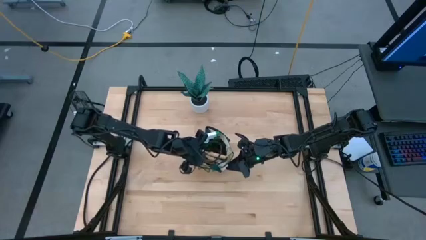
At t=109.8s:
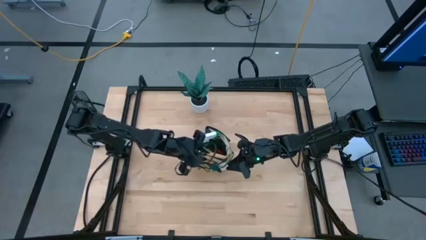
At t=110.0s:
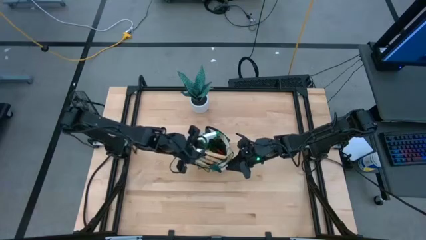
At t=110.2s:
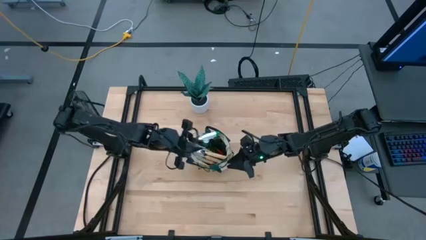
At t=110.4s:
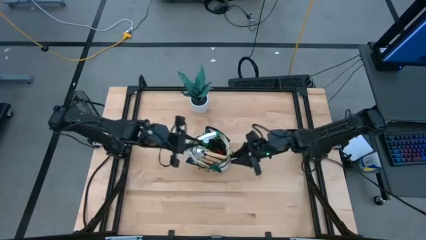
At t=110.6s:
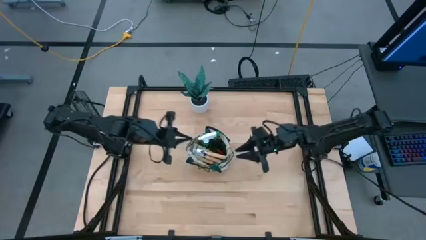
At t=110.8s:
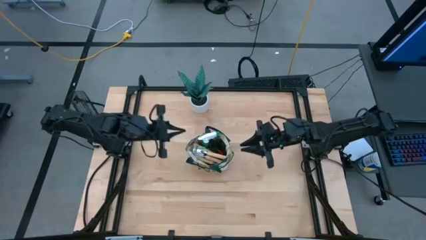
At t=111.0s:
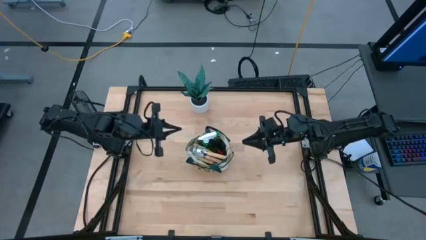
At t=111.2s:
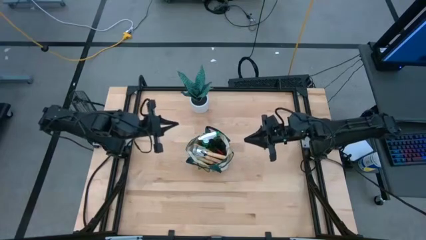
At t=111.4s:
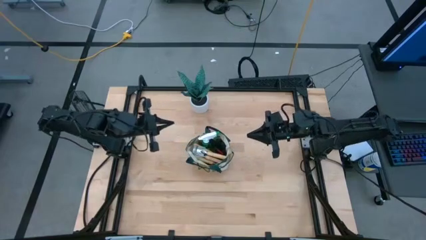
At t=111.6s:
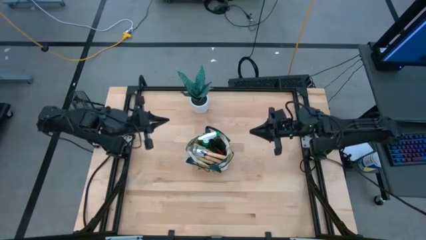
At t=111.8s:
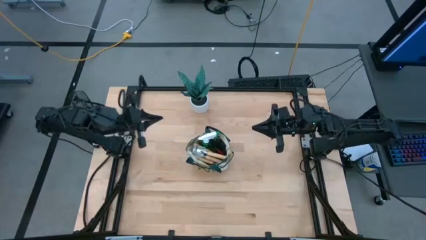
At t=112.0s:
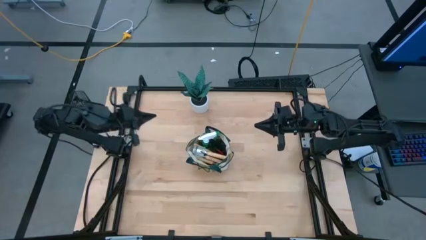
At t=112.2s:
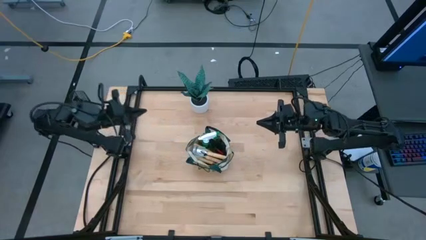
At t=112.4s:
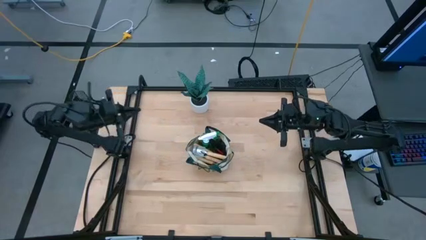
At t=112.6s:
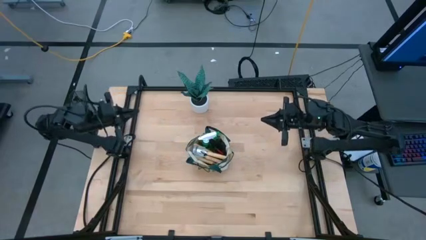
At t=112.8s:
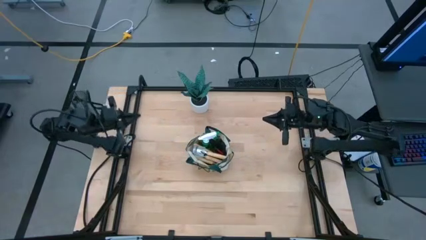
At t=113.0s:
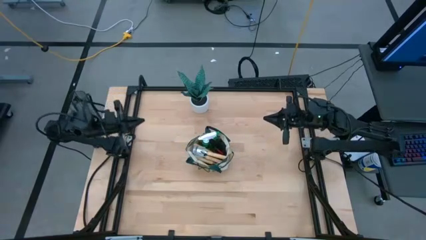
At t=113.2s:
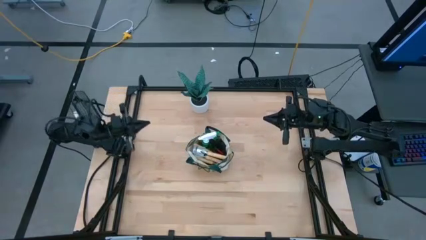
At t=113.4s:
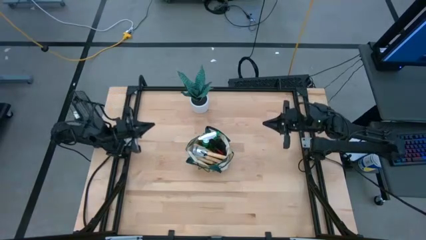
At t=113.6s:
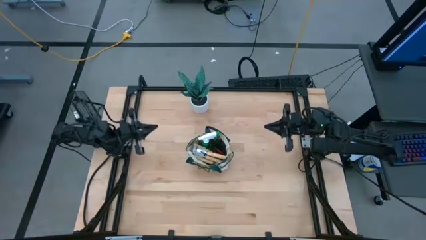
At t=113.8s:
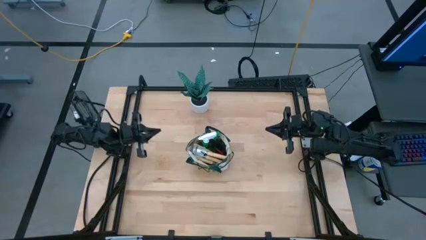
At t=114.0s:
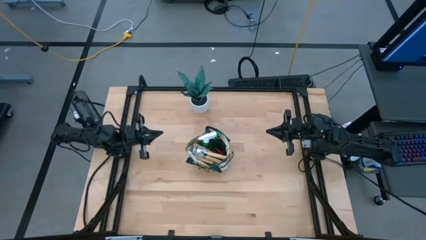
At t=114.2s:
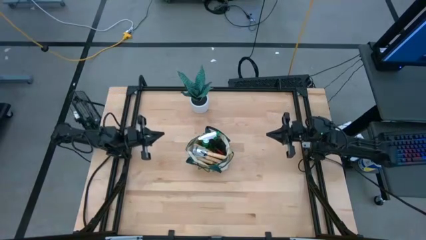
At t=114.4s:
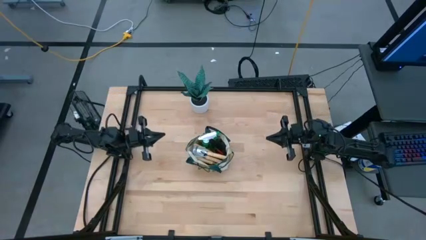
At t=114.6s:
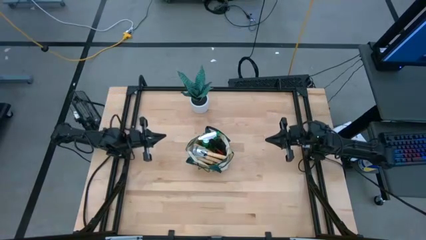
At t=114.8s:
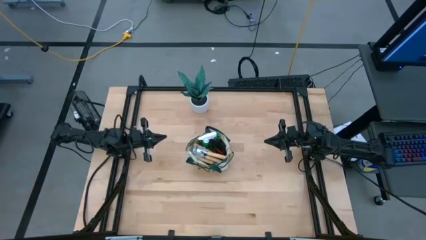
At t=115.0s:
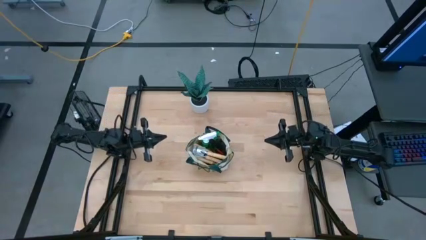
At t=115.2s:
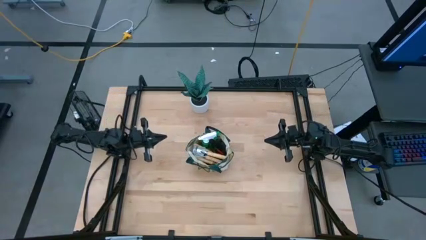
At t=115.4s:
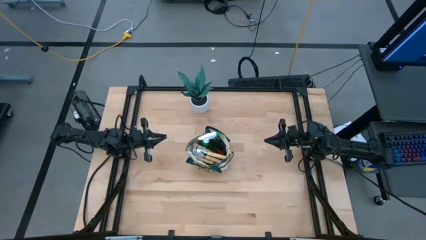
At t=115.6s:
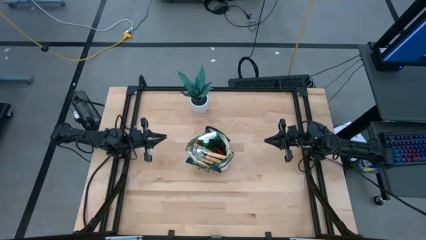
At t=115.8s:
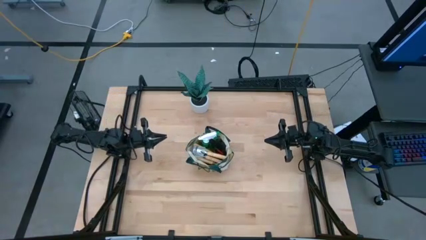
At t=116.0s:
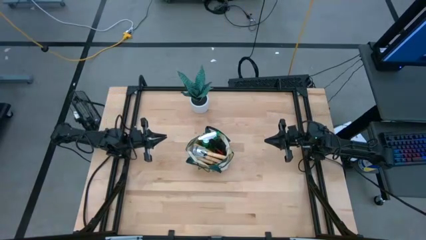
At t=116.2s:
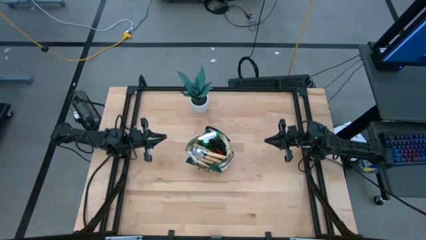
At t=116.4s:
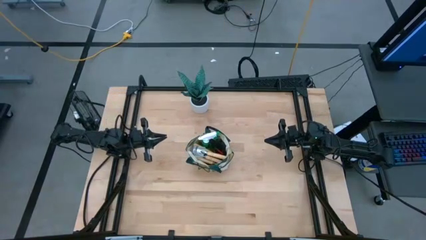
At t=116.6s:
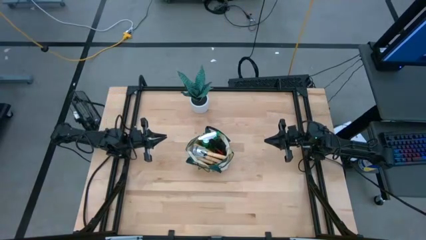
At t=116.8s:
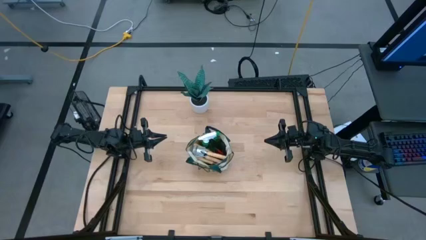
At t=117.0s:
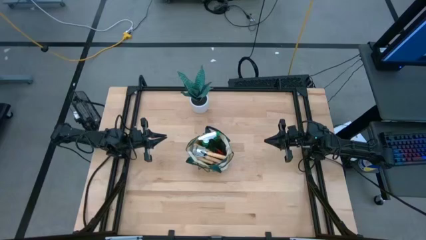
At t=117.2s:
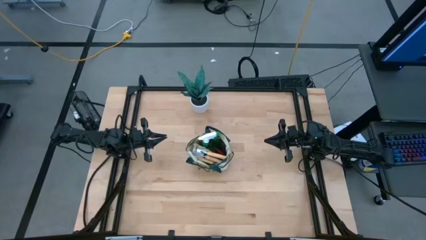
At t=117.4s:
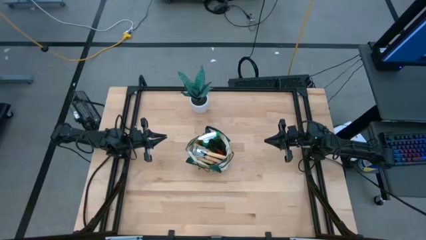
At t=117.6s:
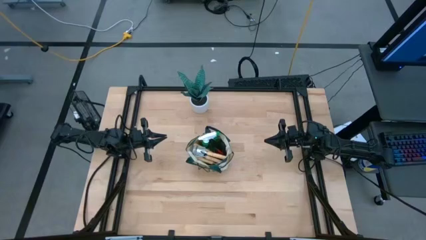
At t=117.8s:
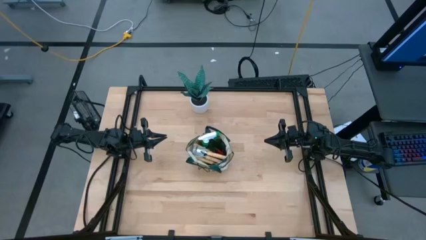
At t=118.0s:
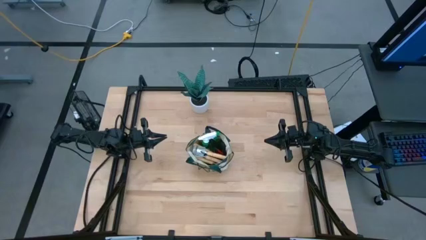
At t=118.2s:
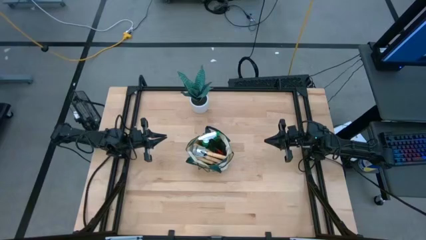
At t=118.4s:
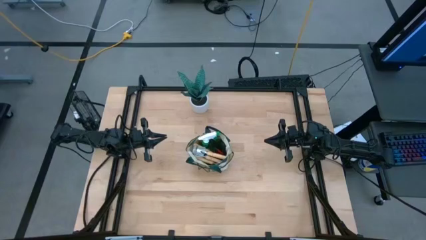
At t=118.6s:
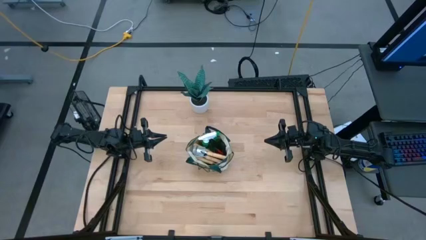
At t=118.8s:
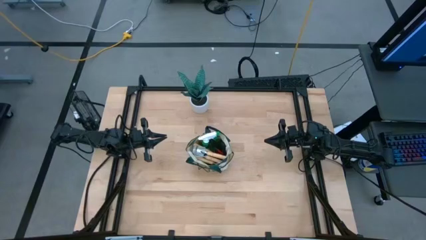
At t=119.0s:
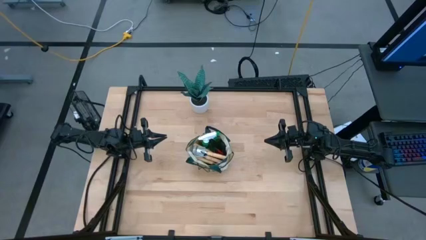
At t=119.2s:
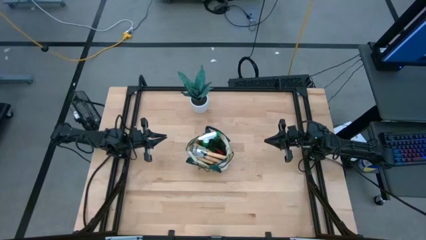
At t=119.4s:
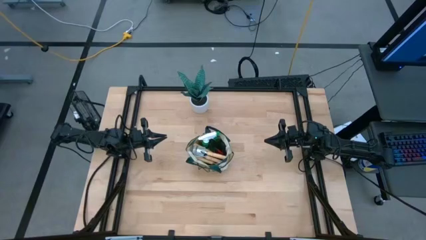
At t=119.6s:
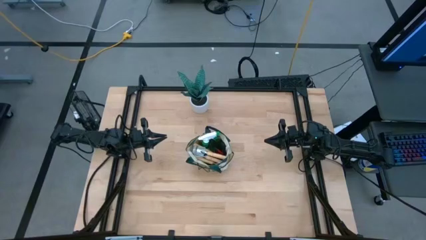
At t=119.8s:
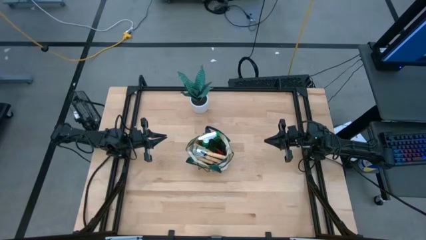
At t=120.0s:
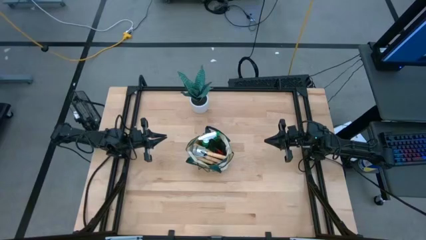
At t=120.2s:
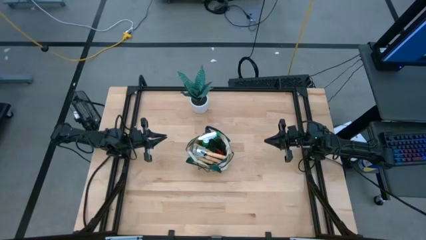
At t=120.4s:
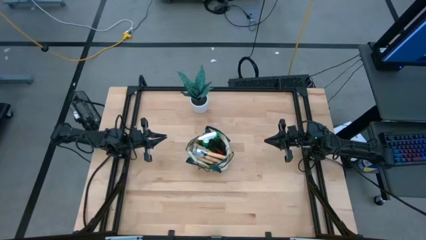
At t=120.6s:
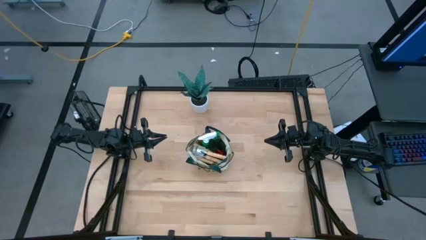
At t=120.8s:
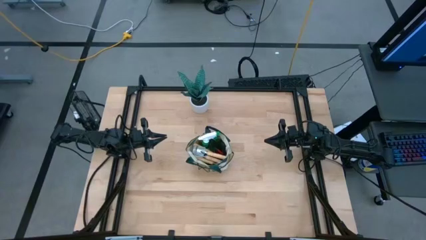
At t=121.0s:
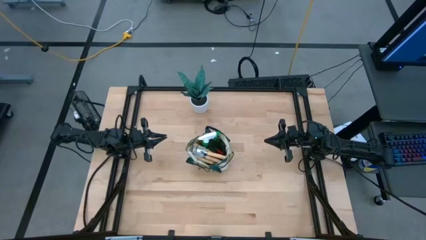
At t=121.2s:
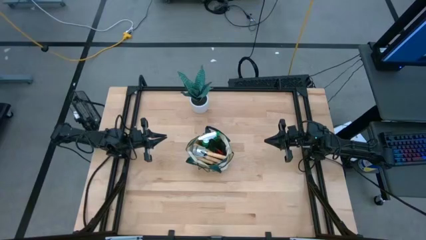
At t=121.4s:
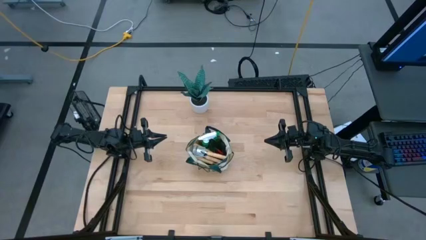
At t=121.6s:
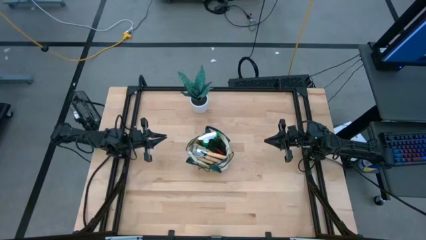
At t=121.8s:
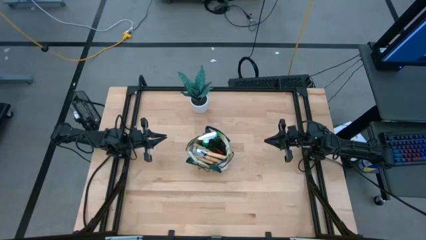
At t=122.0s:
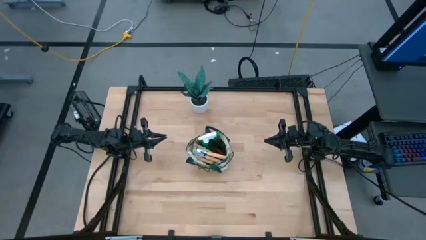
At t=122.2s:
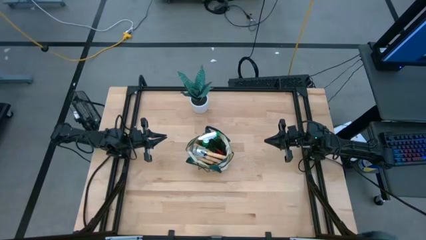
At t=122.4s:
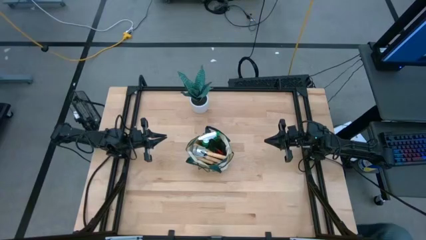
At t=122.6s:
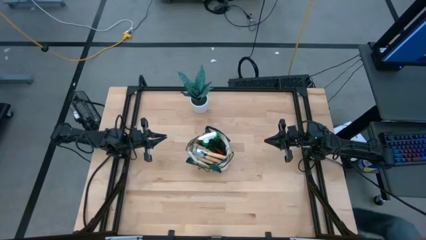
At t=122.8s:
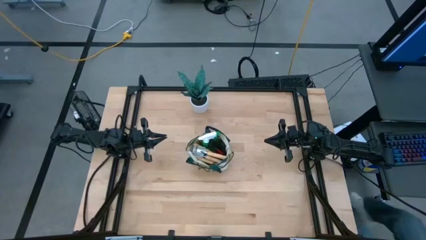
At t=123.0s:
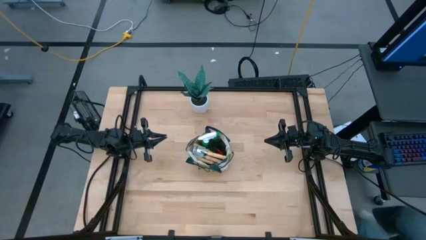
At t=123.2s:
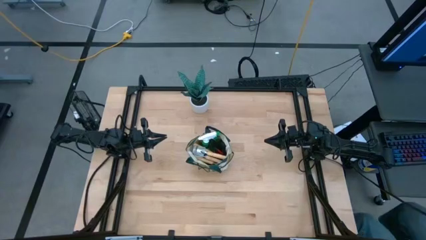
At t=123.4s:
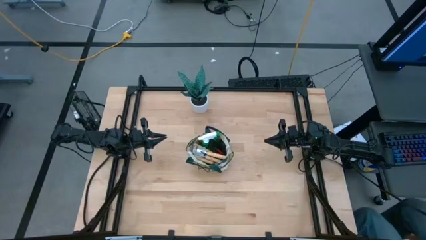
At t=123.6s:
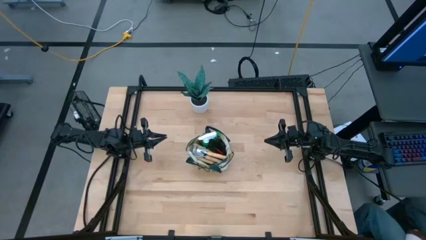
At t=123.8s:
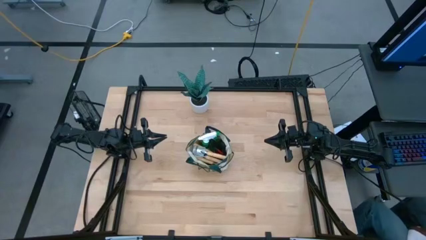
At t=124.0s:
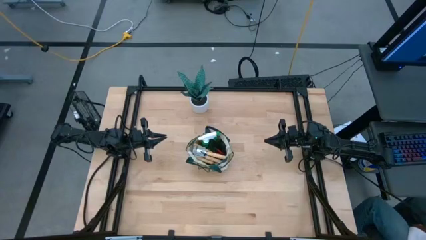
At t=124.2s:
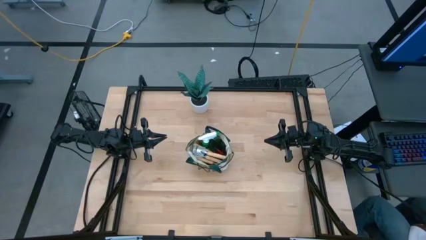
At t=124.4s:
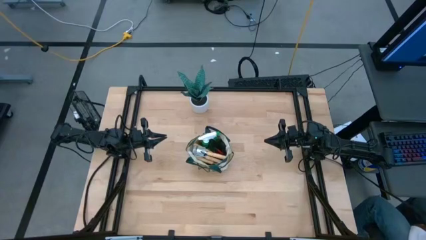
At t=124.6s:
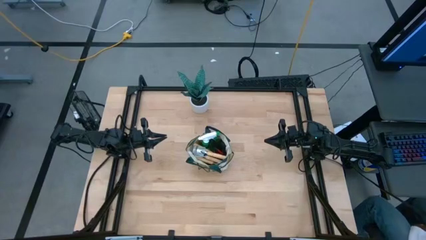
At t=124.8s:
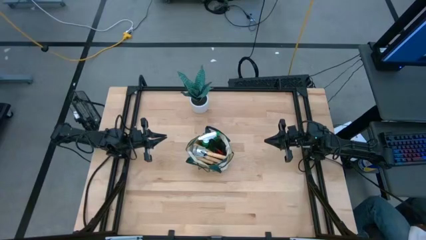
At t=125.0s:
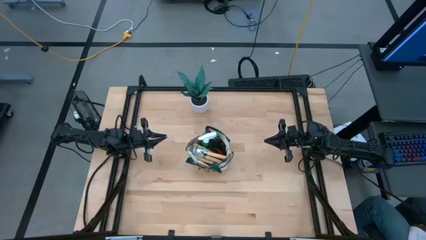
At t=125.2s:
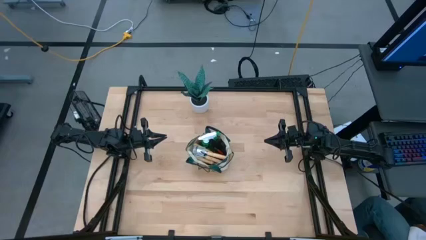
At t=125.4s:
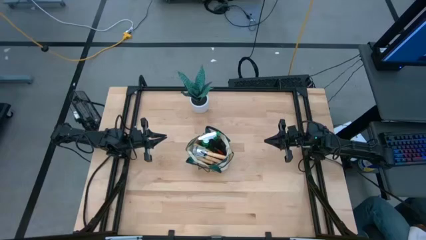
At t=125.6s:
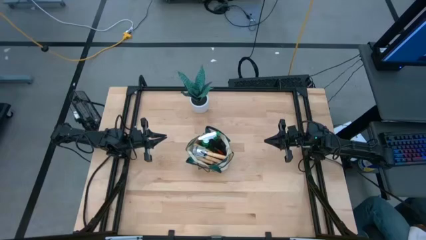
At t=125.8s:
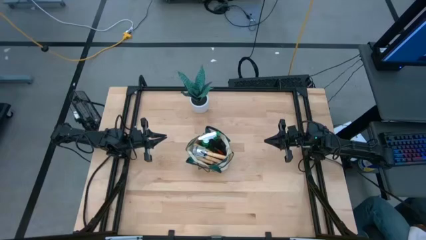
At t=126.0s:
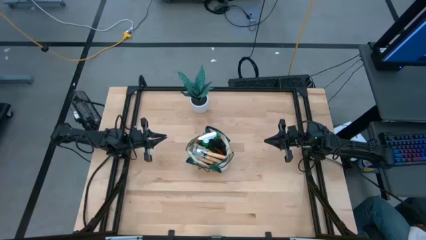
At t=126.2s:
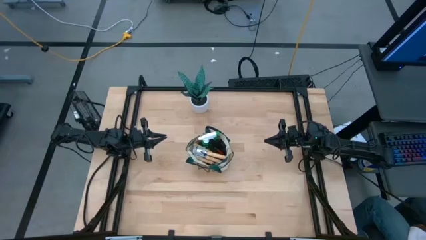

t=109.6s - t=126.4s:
Task: Pick & Place Garden tools in Gardening bag
Return to Home Position
